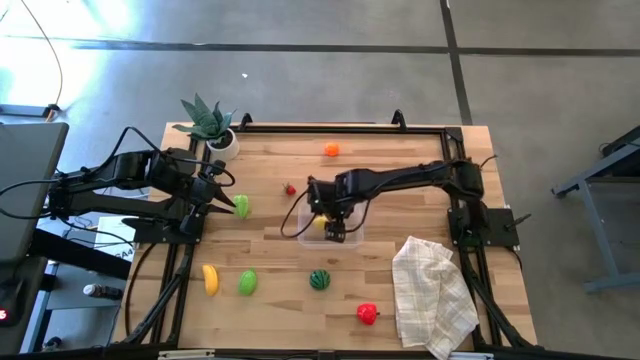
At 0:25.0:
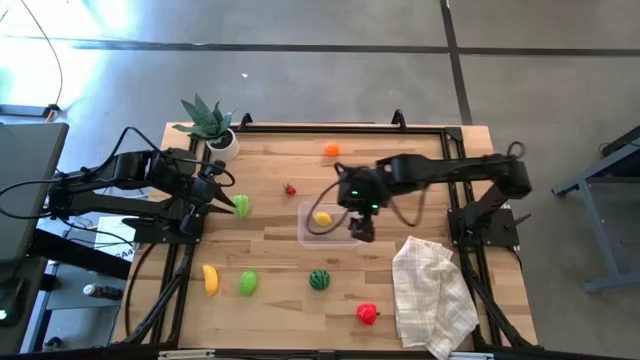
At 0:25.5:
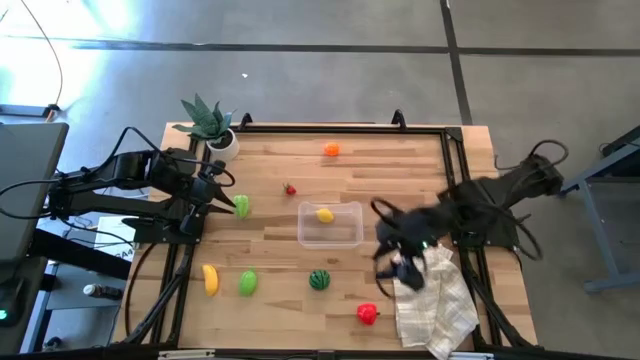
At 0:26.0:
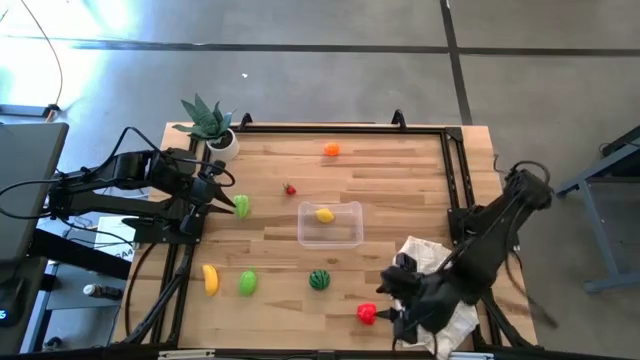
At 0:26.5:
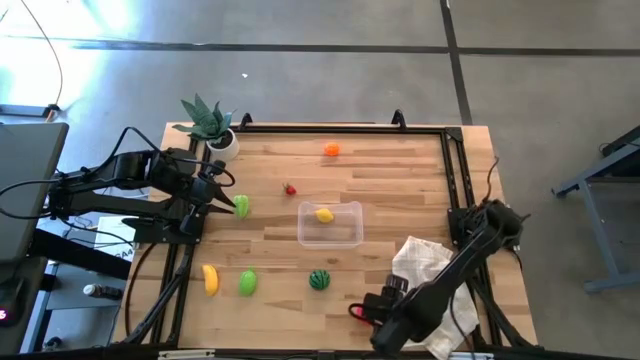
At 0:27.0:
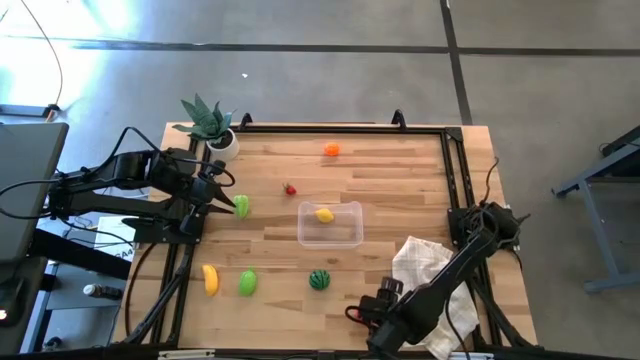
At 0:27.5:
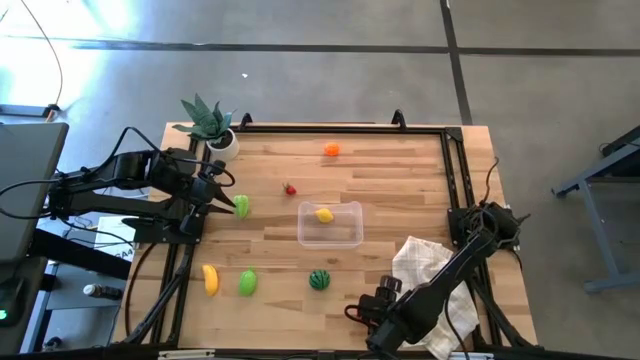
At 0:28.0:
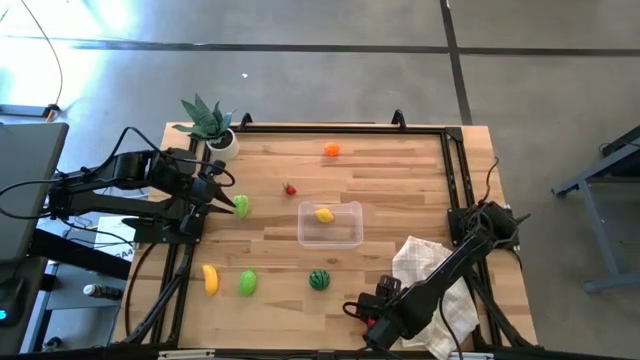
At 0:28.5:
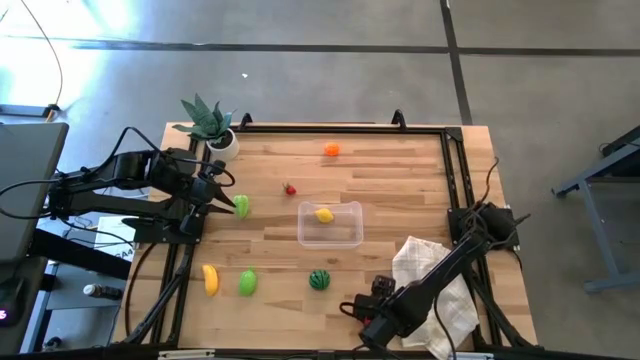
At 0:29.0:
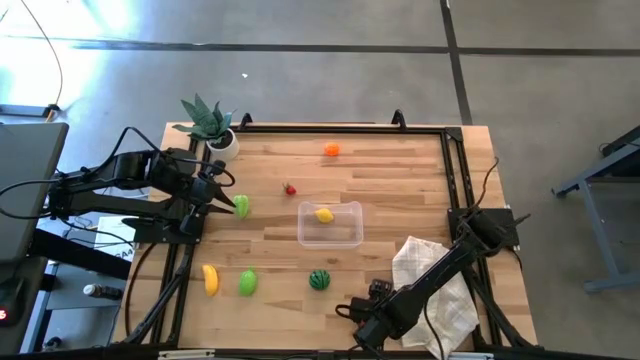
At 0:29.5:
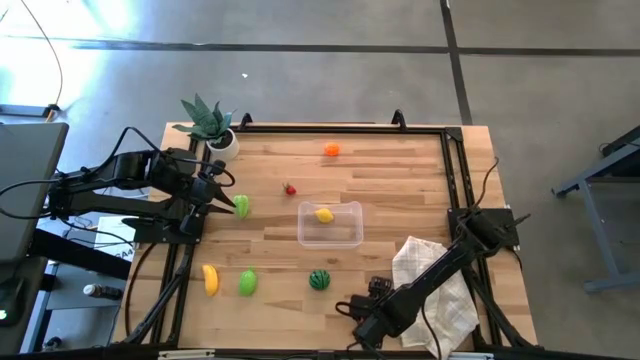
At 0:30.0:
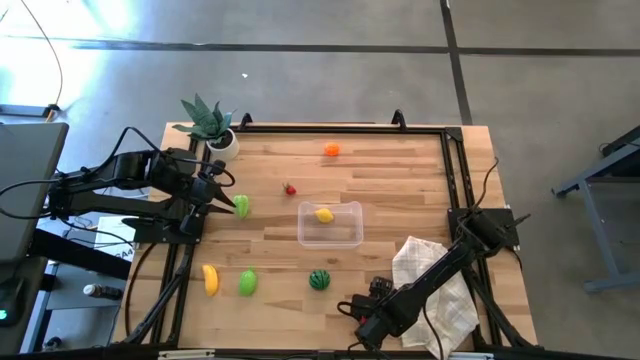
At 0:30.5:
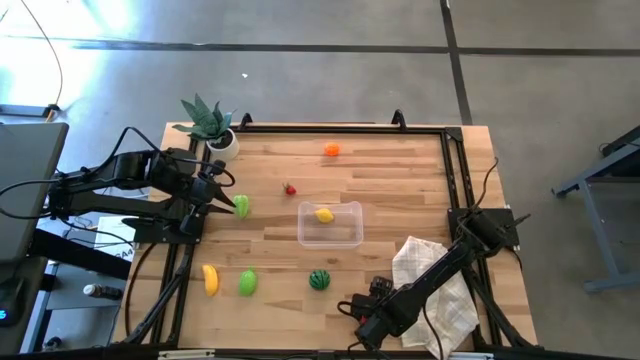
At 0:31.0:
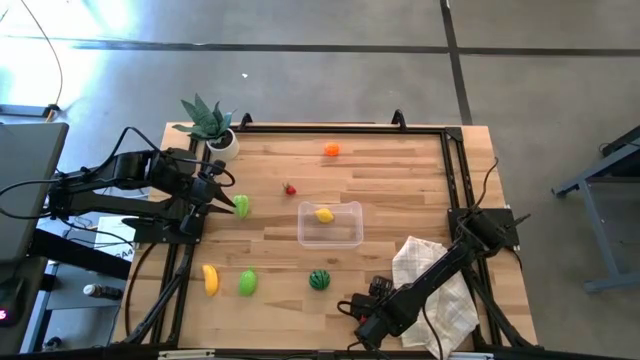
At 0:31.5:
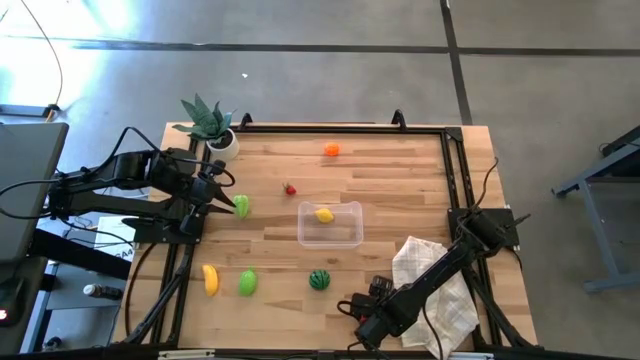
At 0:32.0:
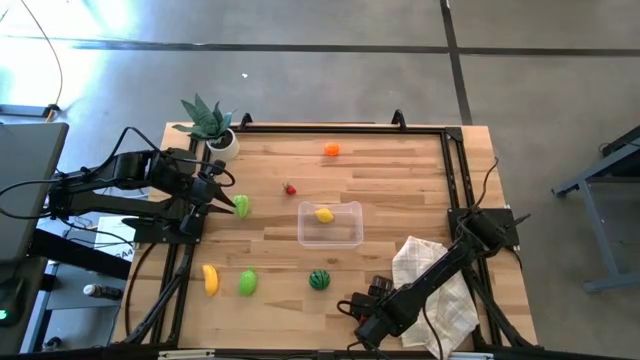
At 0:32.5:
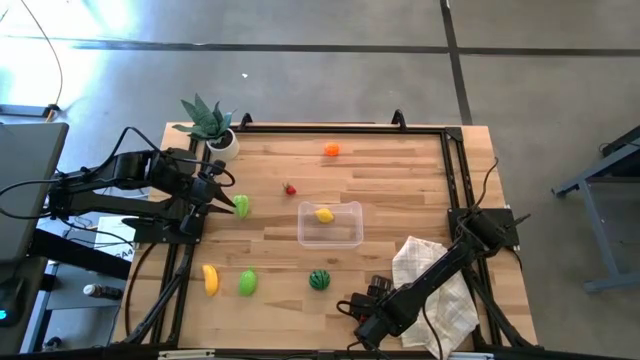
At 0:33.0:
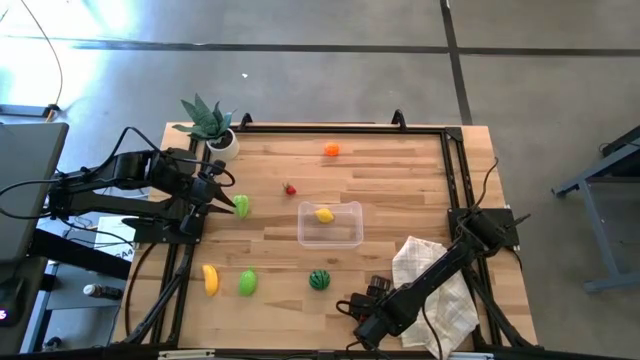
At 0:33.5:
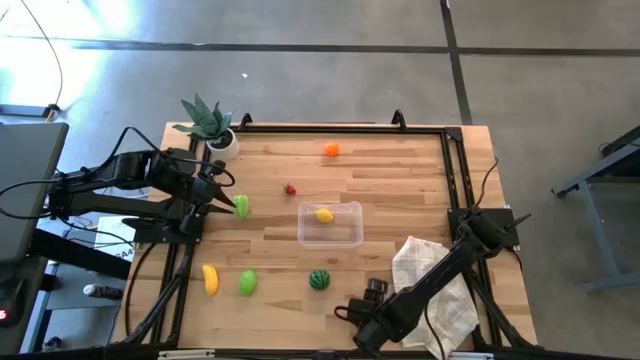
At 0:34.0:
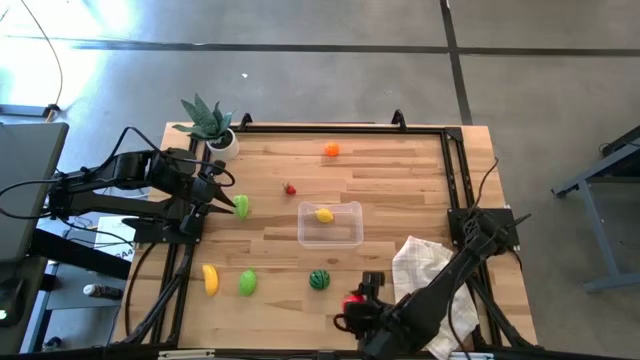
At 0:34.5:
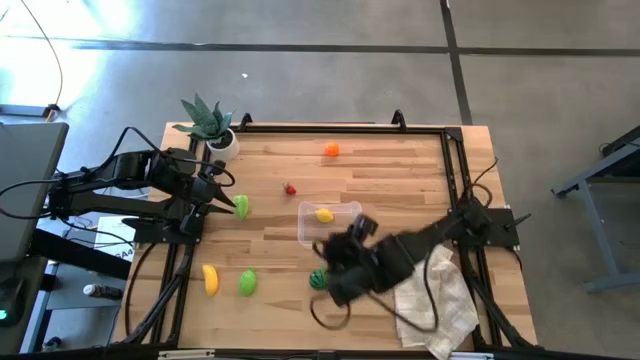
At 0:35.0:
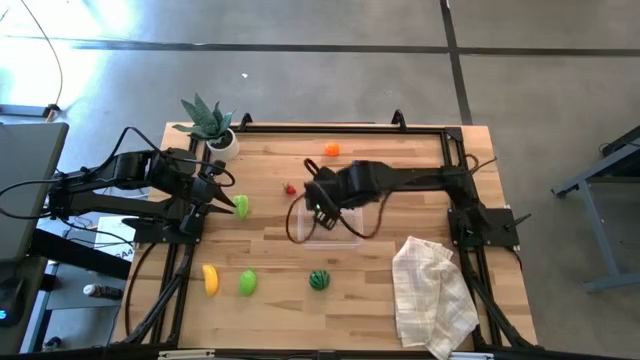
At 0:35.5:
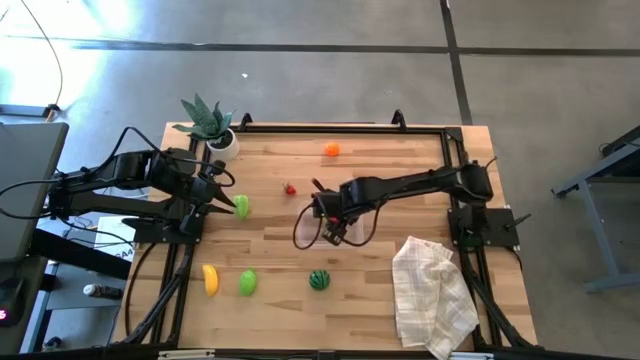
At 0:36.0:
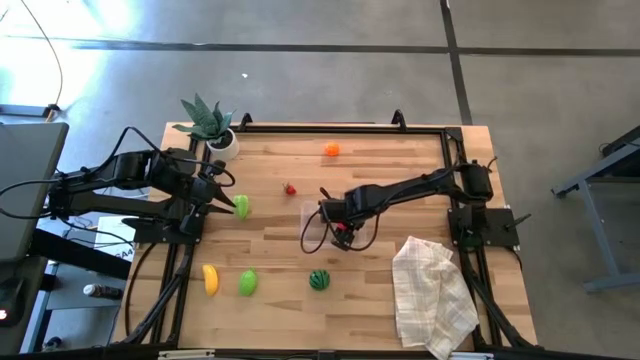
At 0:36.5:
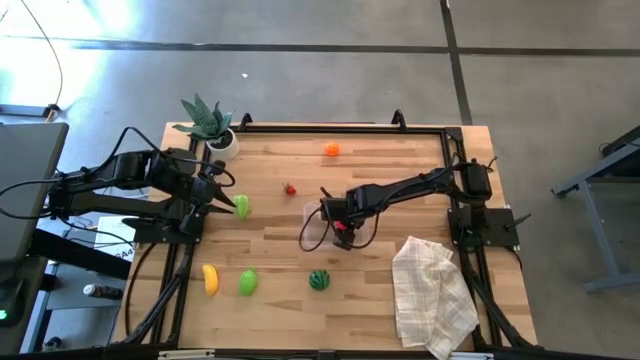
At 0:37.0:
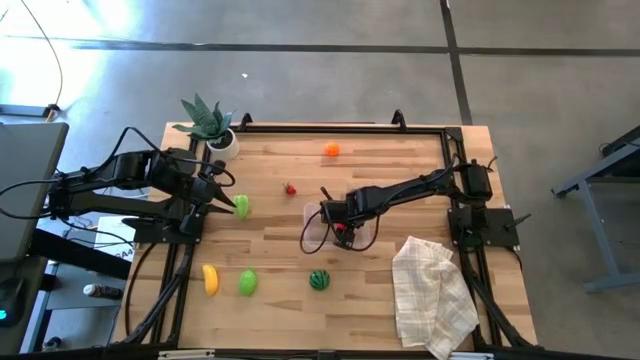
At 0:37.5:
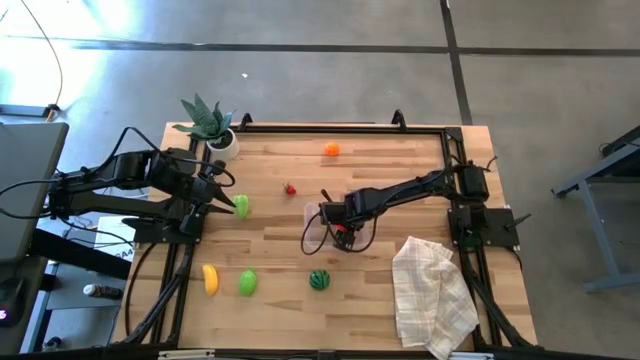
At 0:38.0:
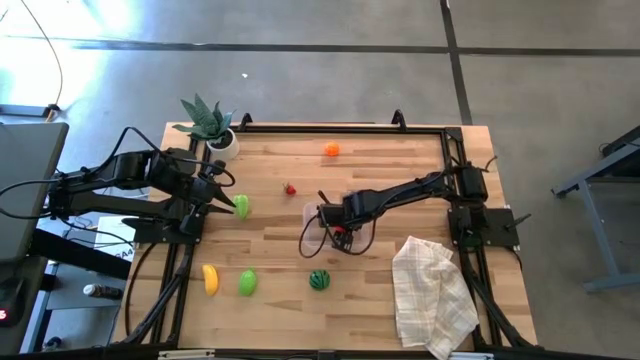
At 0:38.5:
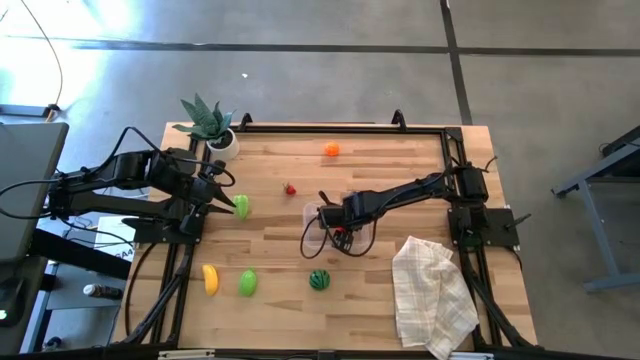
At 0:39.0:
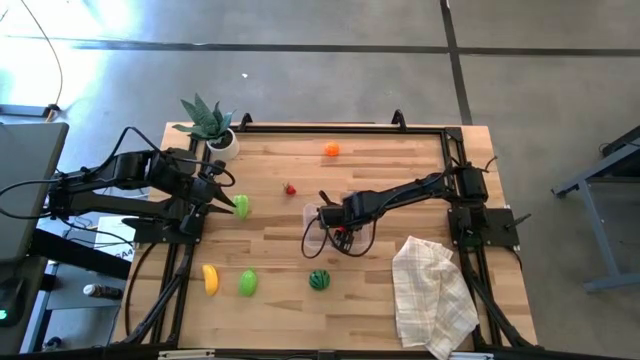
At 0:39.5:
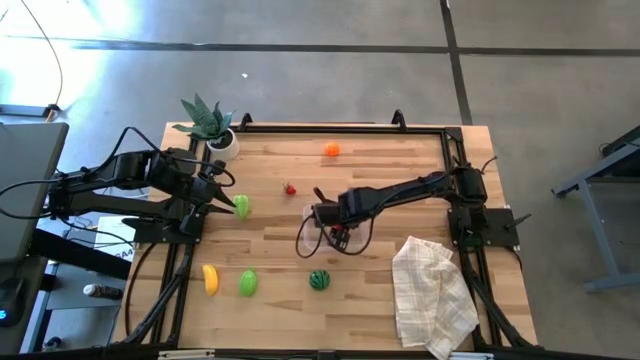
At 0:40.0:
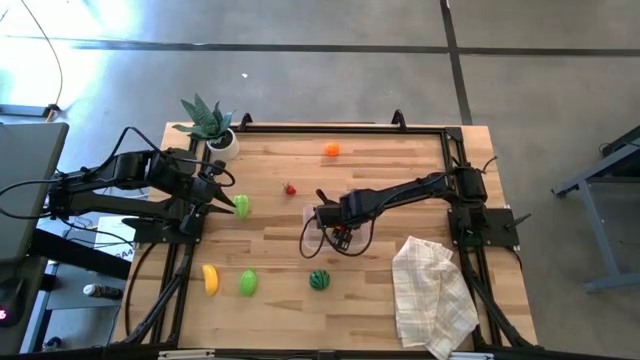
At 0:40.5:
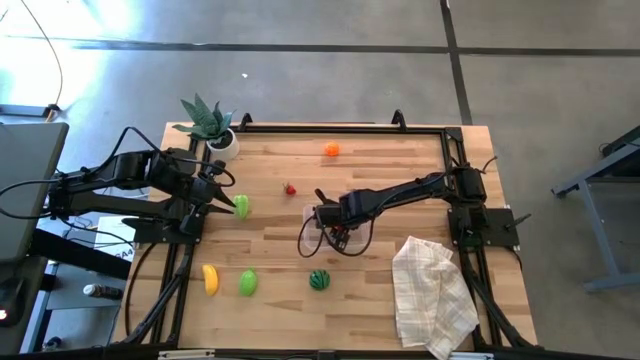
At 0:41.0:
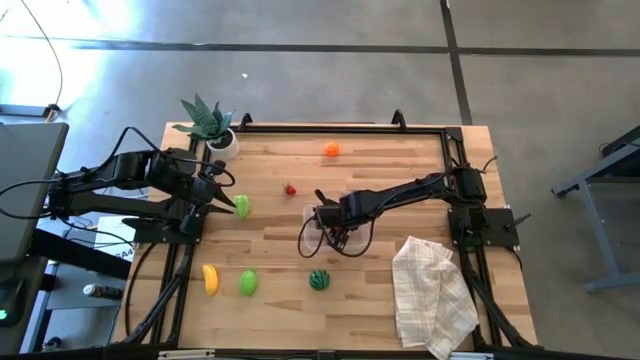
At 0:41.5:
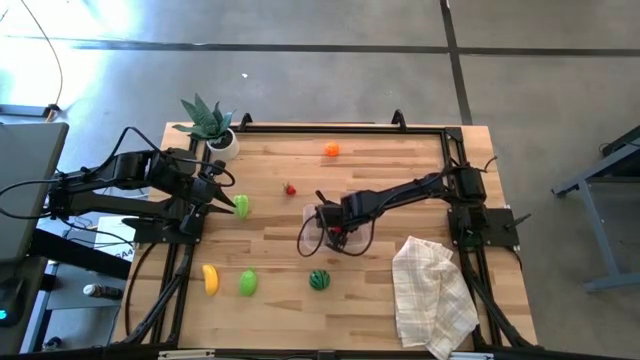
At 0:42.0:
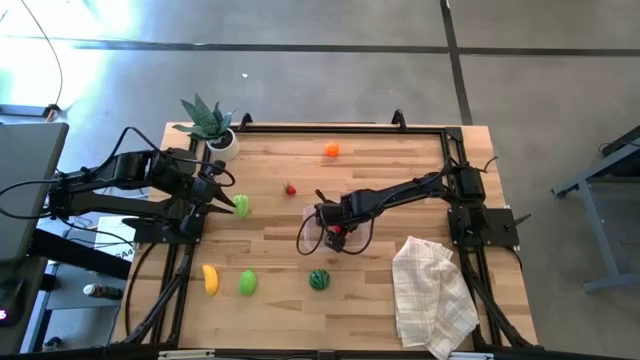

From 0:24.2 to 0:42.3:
Task: Pick and placing Produce into tupperware
Put the red apple into the transparent bin

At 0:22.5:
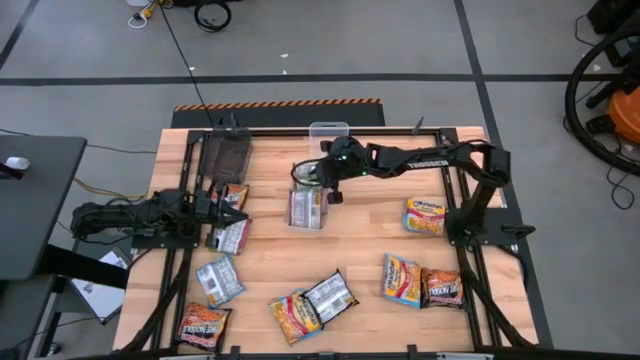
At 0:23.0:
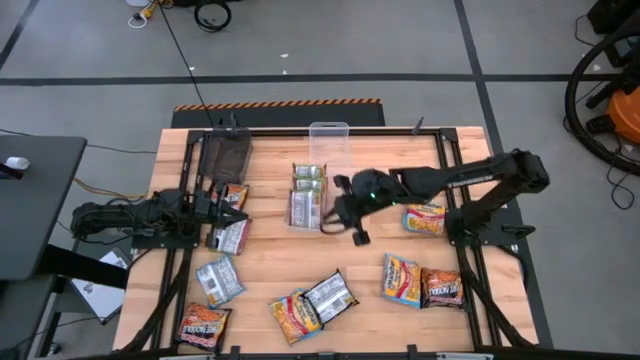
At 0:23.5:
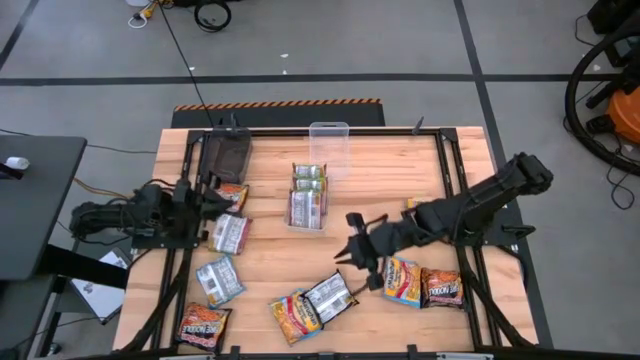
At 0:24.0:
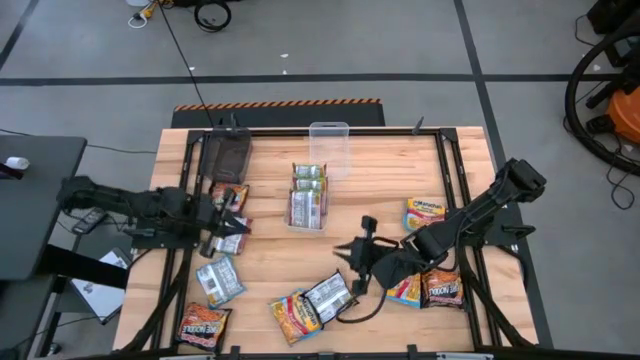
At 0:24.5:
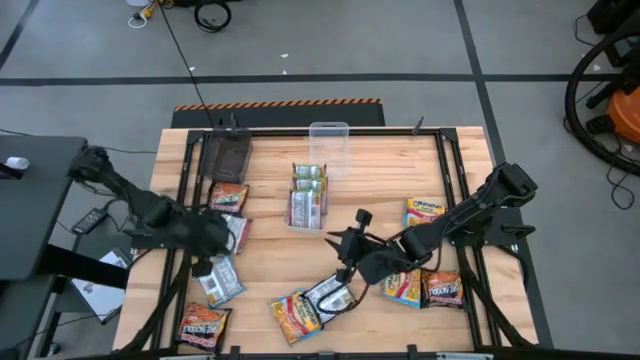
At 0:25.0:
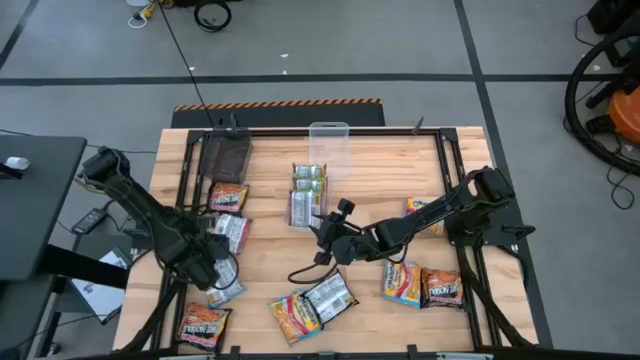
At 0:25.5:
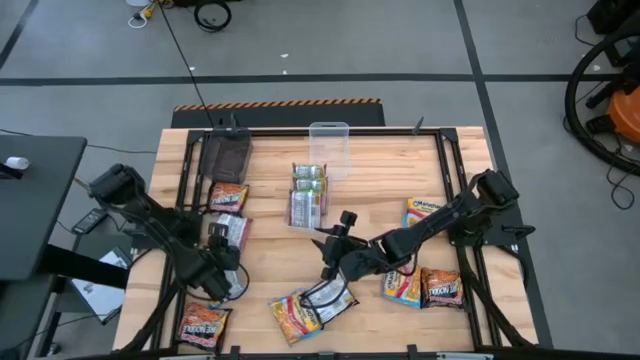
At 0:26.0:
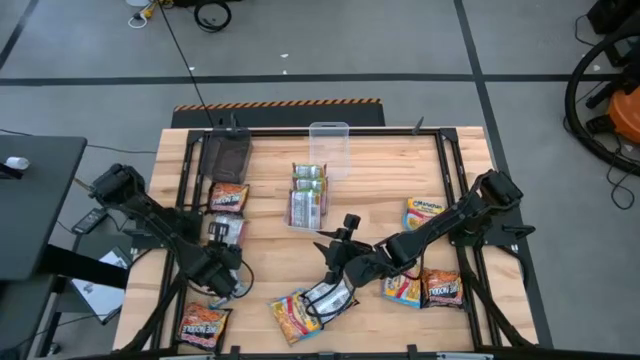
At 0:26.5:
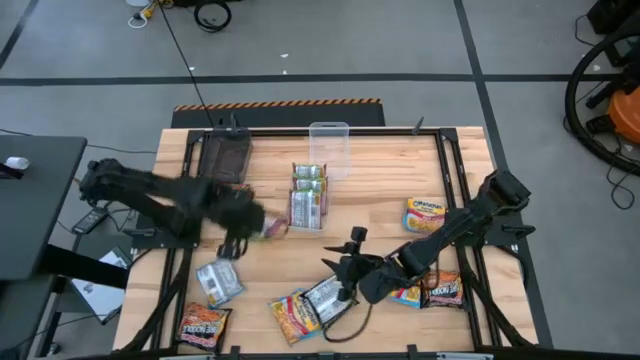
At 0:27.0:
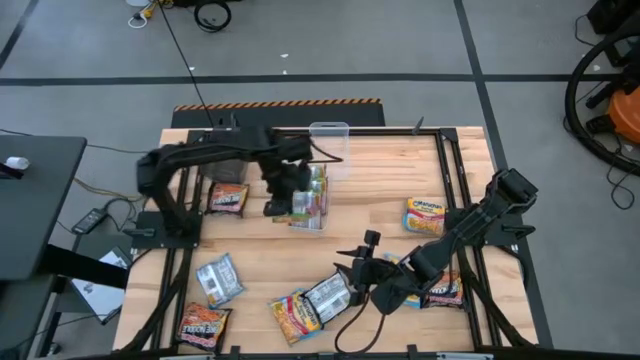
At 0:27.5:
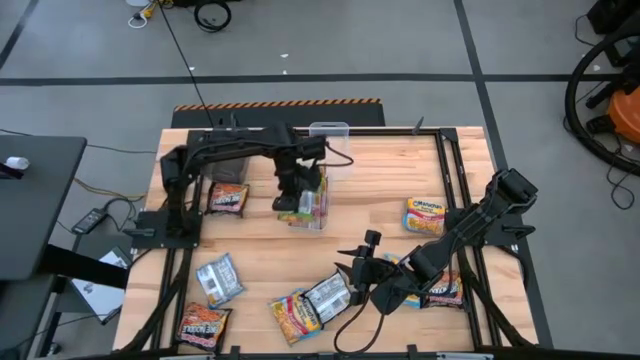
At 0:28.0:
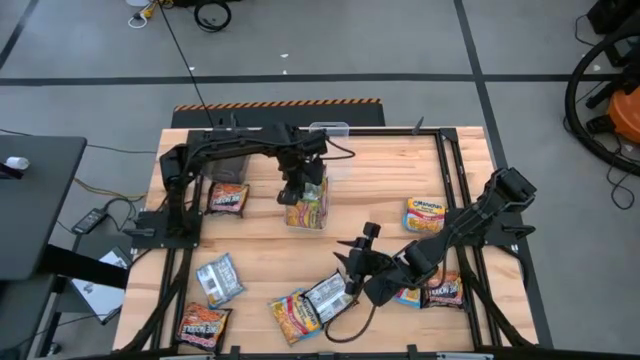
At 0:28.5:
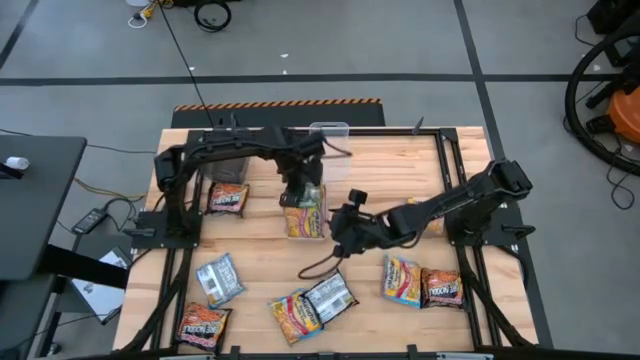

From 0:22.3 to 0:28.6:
Task: Sort Maruchan noodles
Put the green noodle pack into the bottom transparent bin
